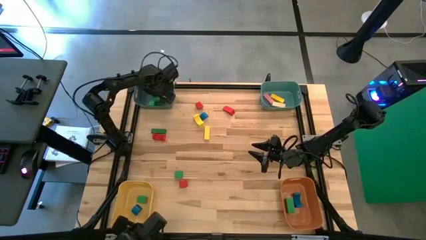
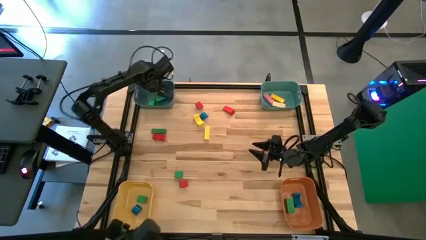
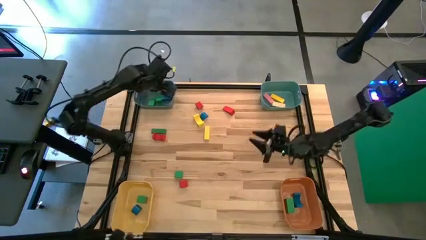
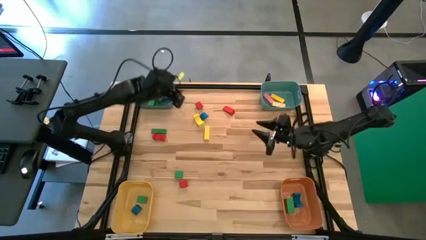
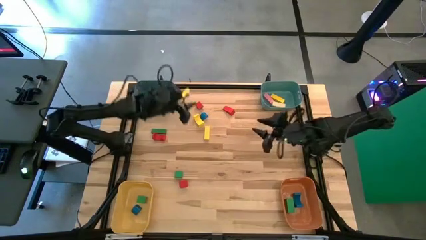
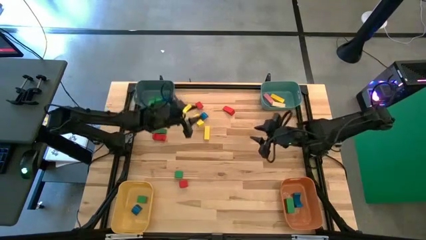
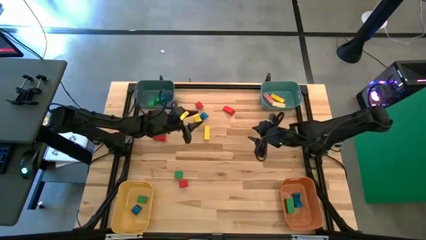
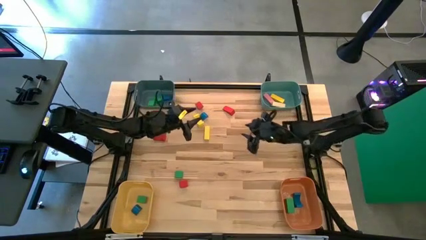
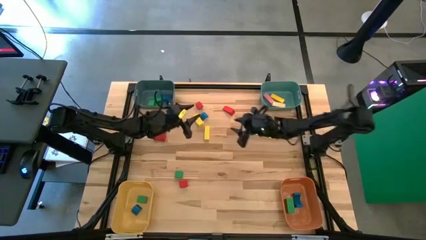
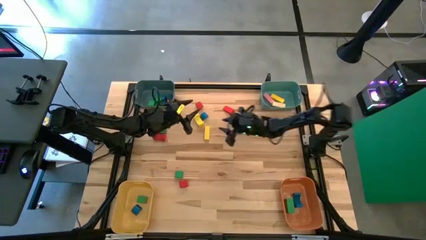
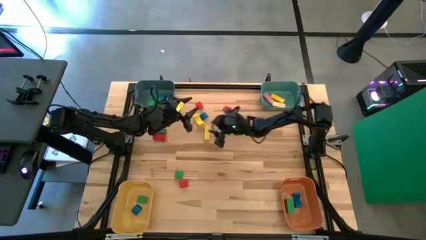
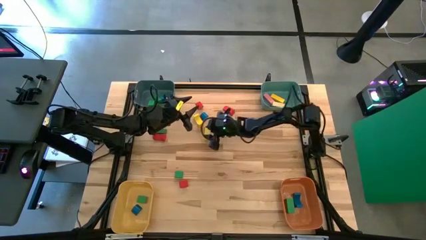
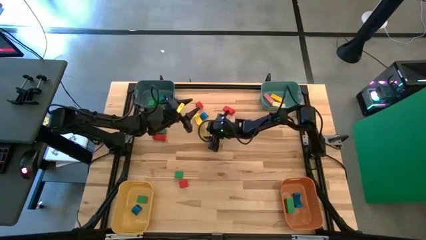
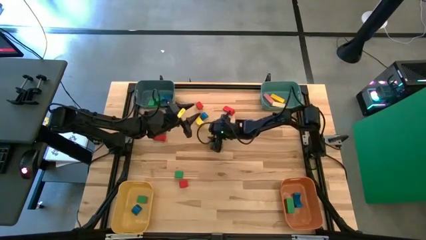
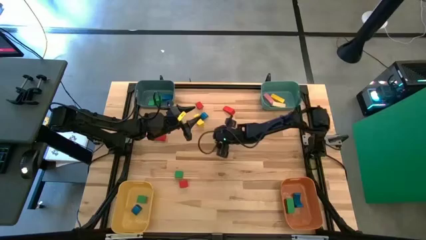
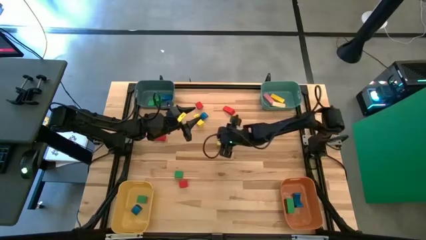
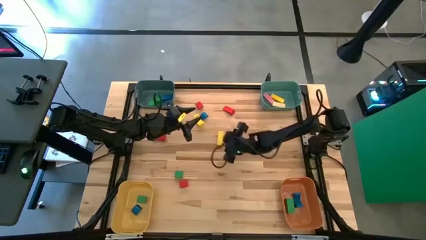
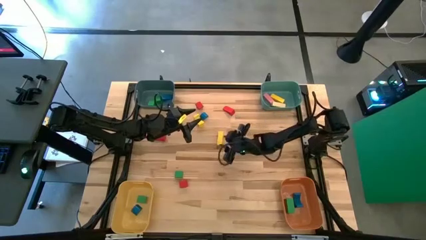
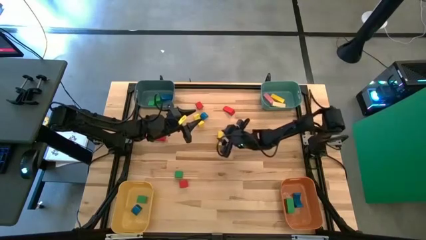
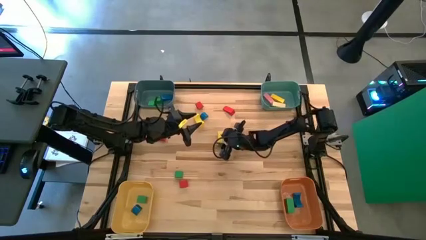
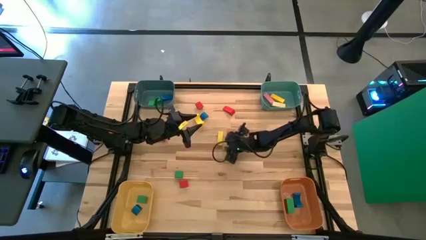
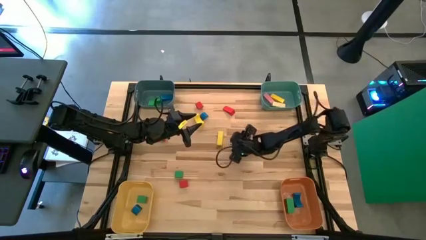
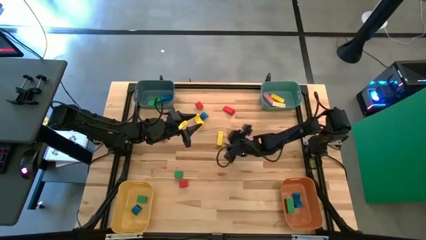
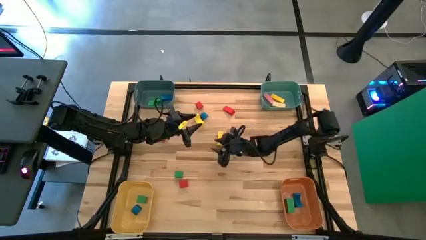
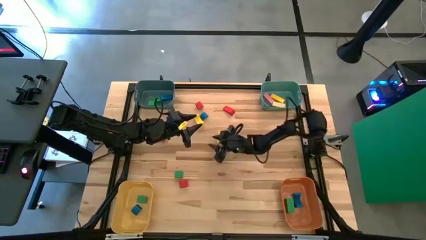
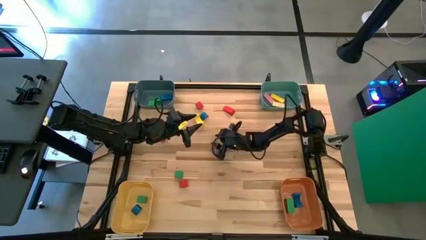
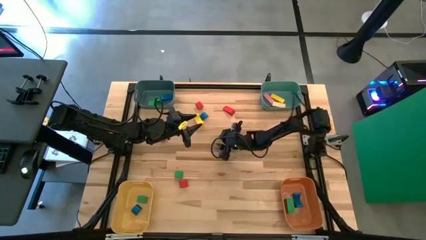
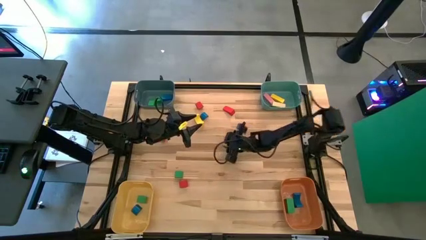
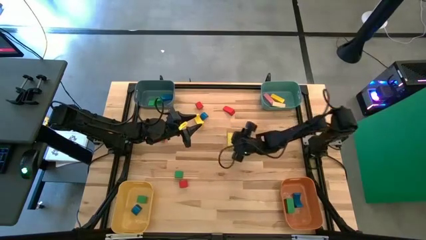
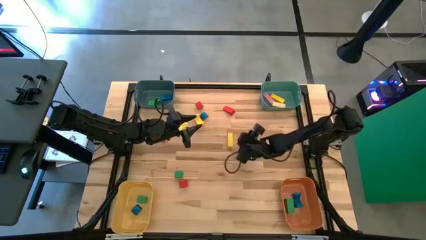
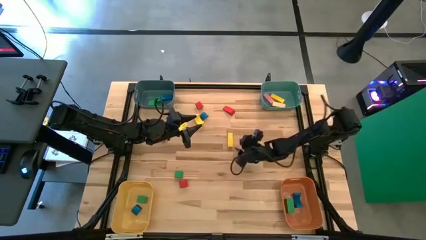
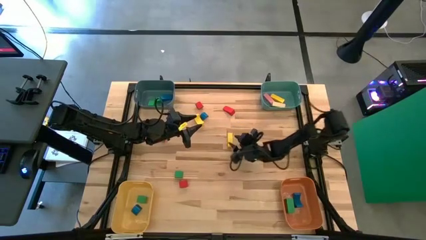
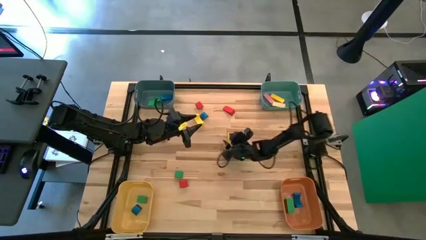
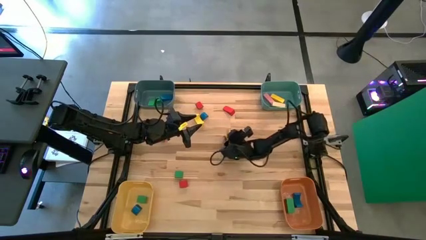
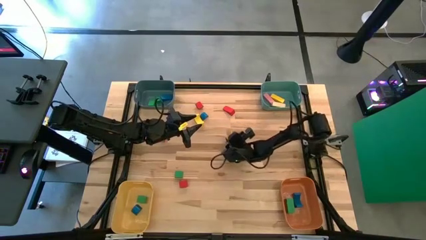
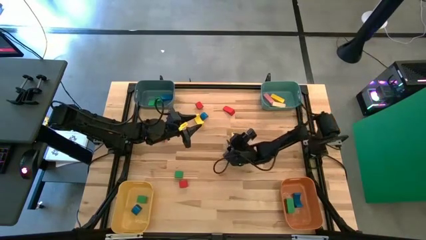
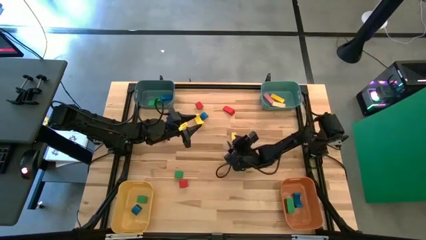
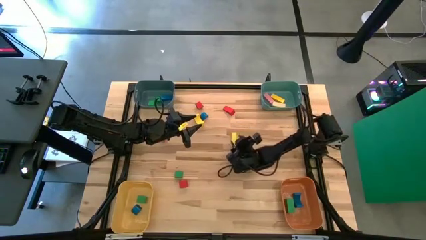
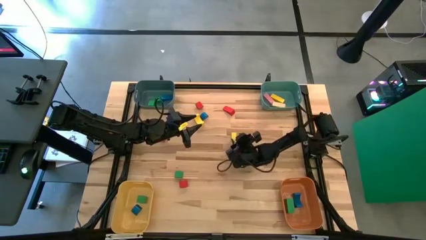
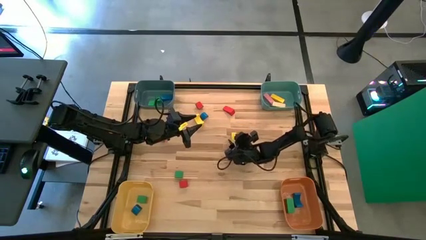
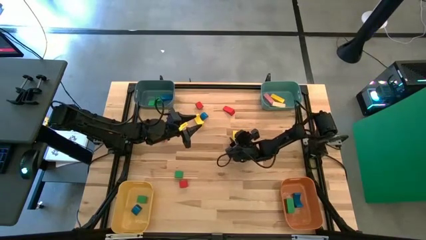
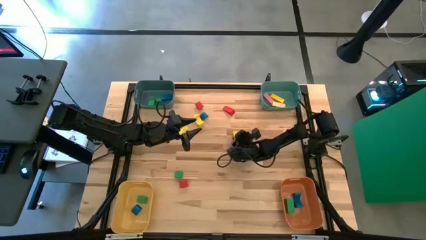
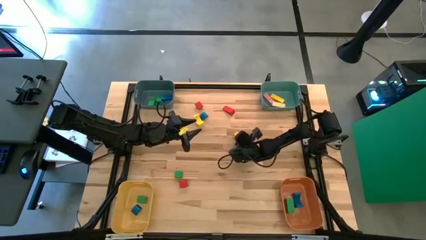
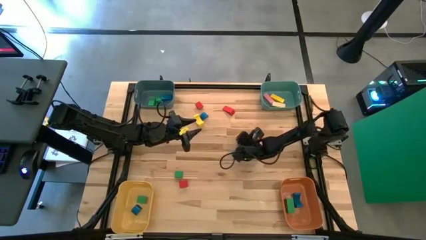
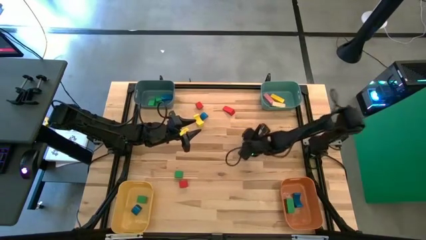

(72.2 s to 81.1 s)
Task: Sort blocks by size
Put the yellow triangular block into the green bin

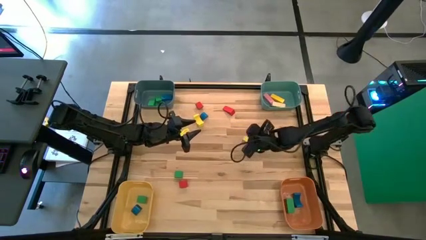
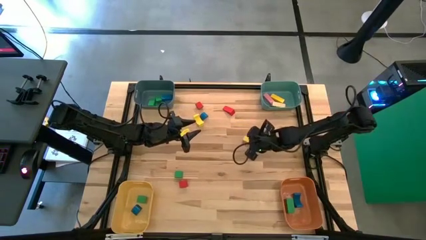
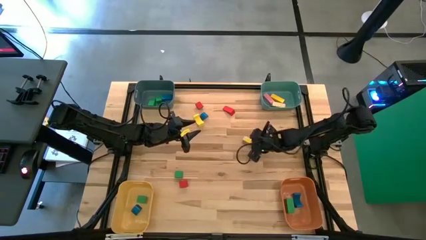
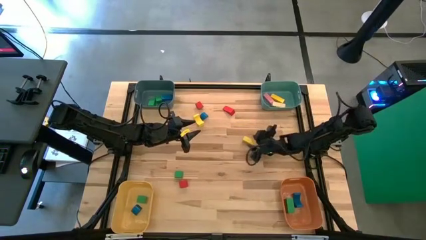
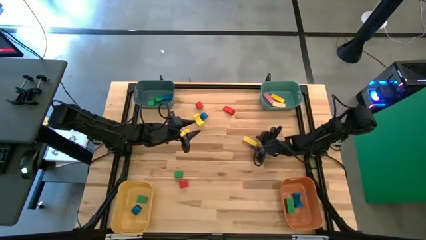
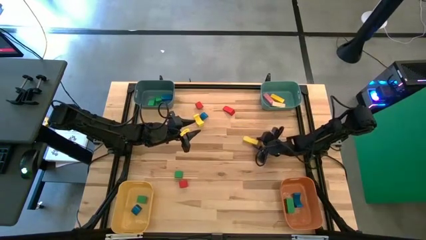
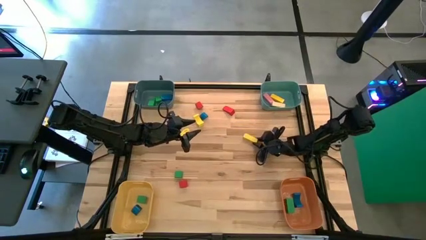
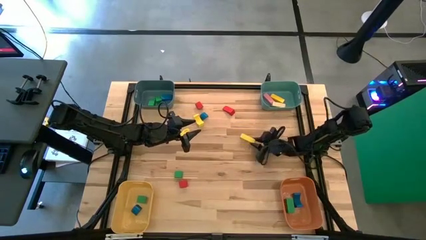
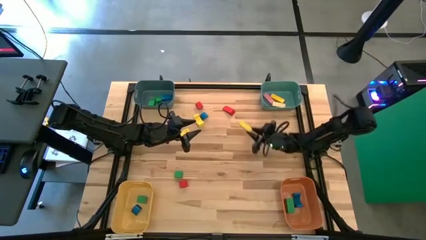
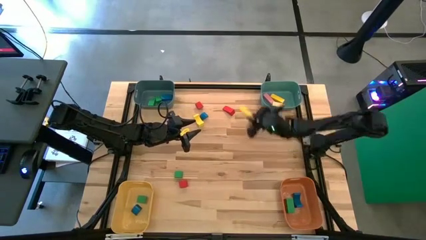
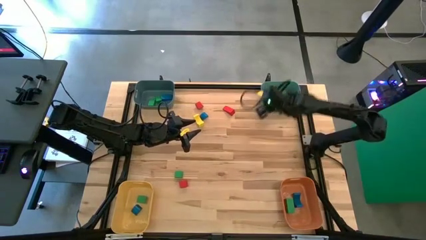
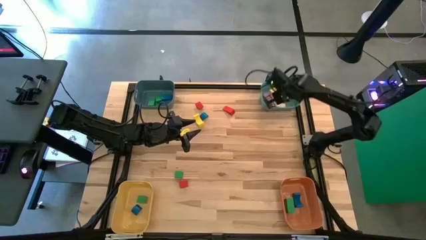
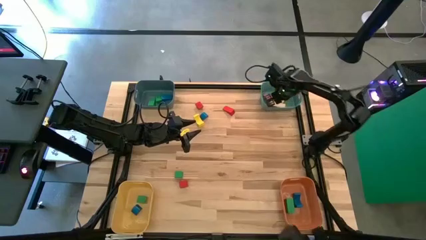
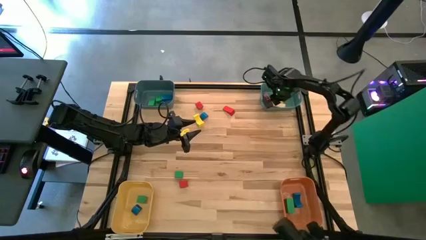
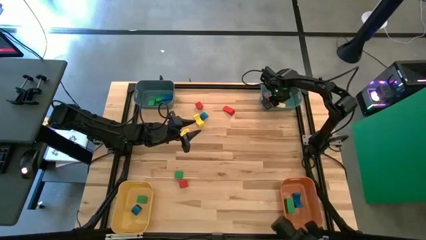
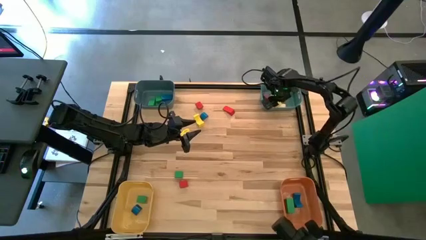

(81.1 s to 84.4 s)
Put the yellow triangular block into the green bin

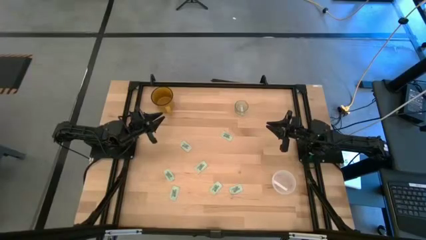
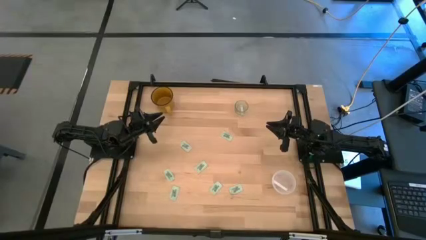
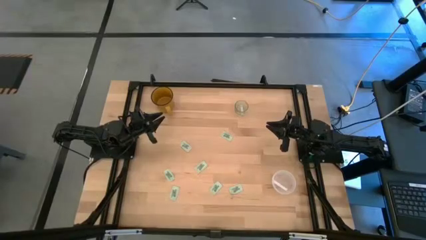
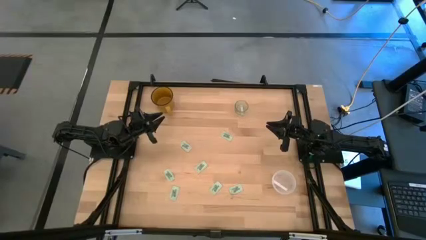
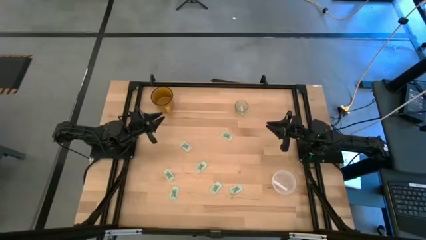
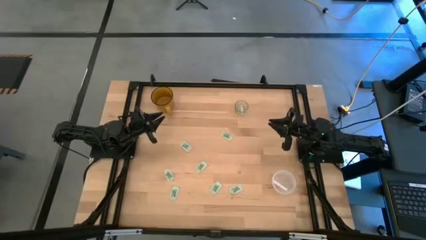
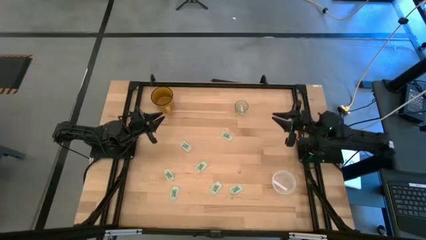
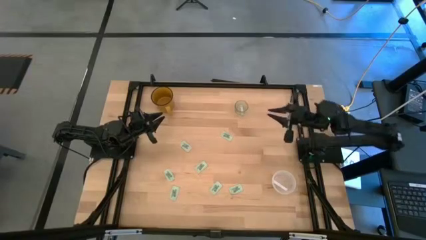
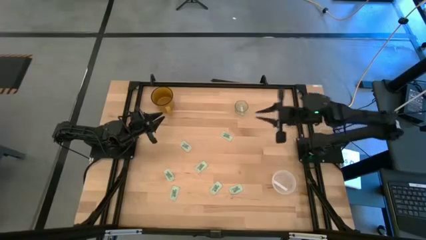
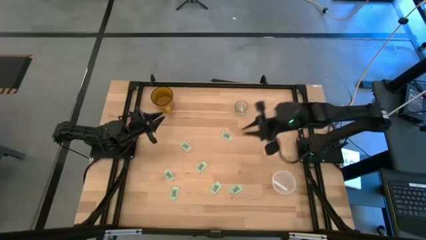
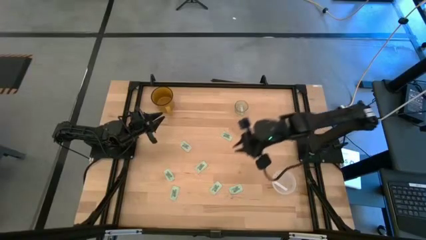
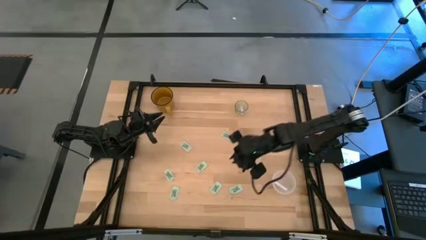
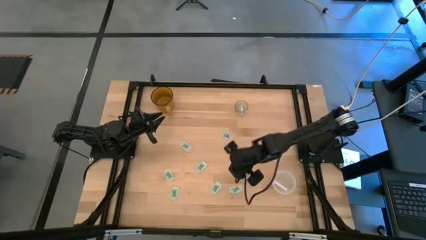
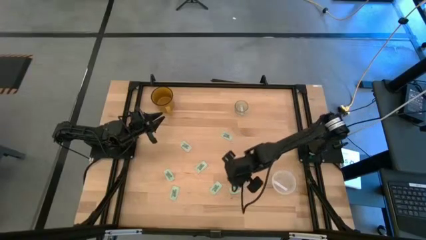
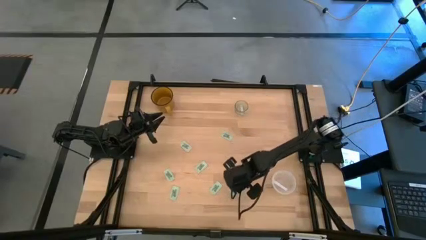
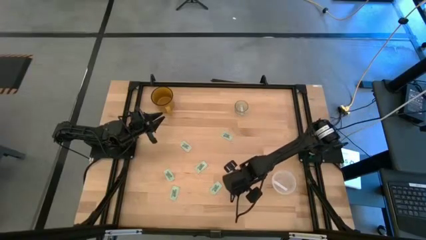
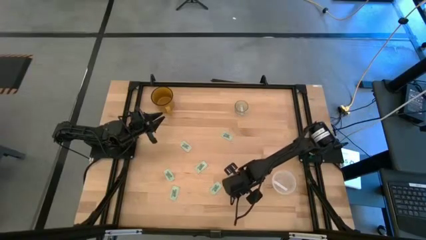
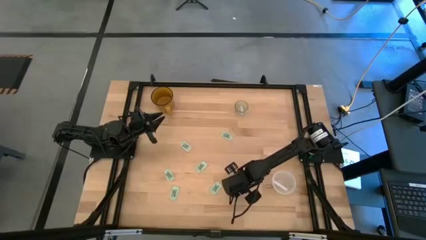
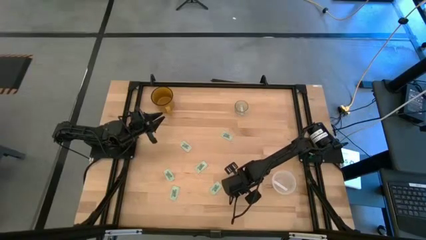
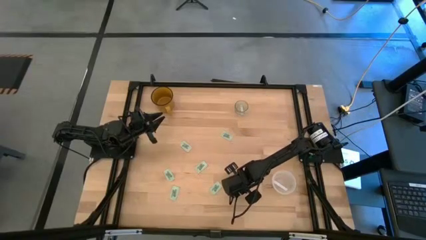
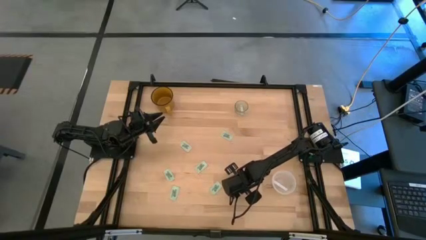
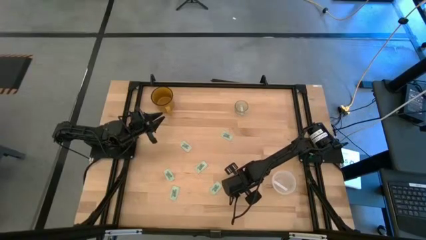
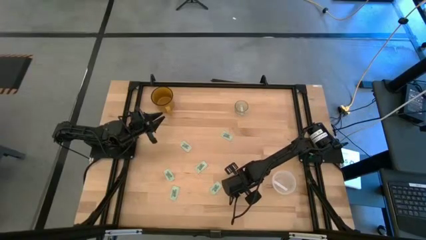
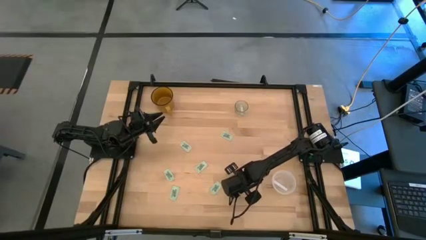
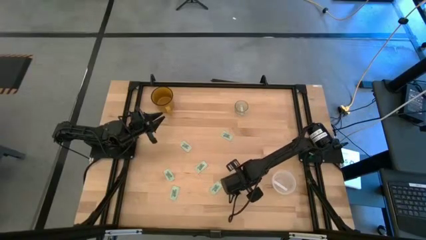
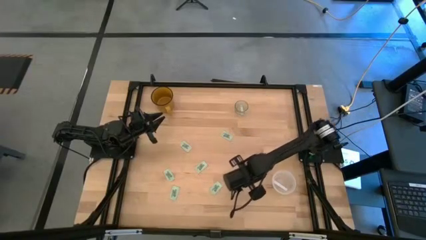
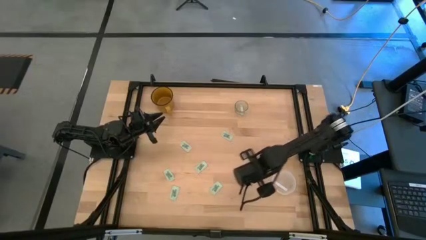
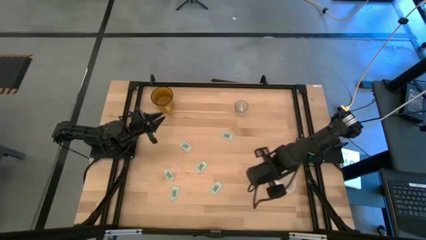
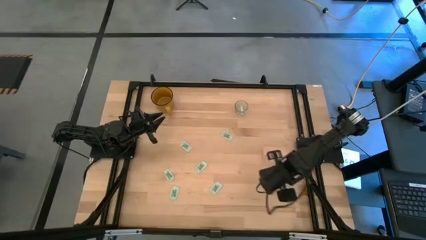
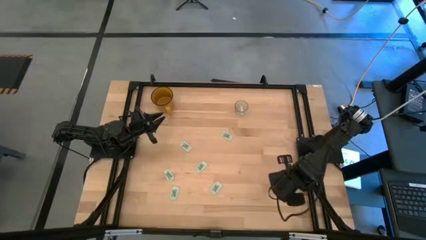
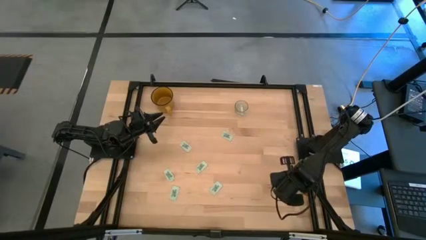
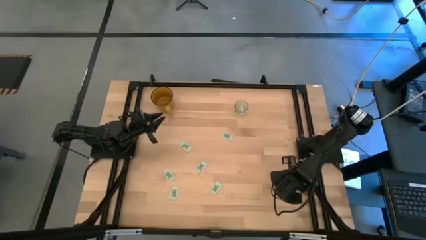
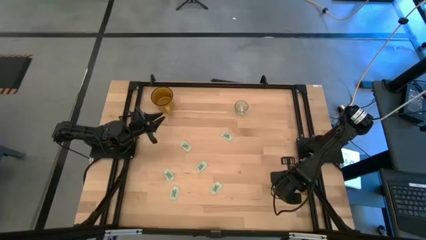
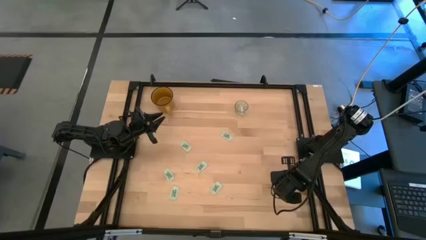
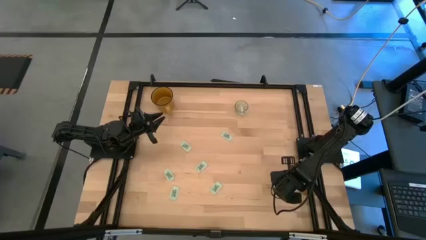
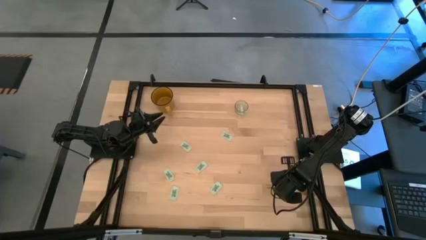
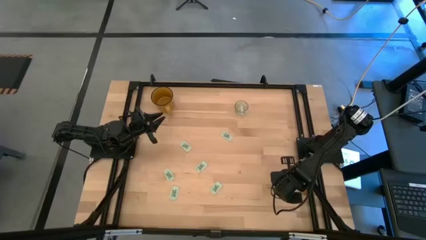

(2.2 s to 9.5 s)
Task: Pick and place Stevia / Truvia into bins
Put the stevia packet into the transparent container
